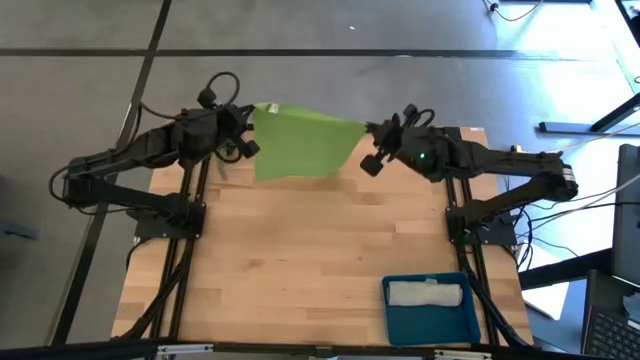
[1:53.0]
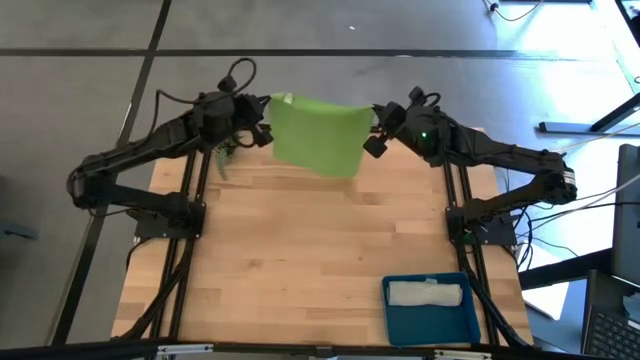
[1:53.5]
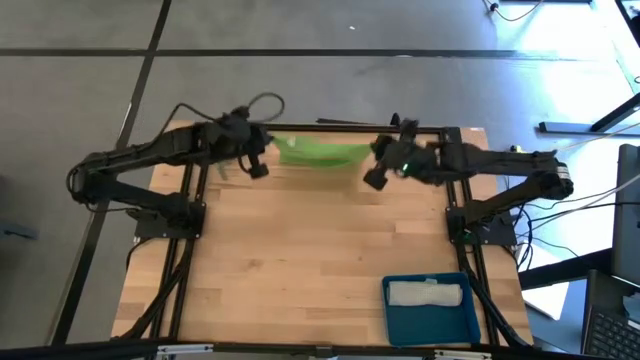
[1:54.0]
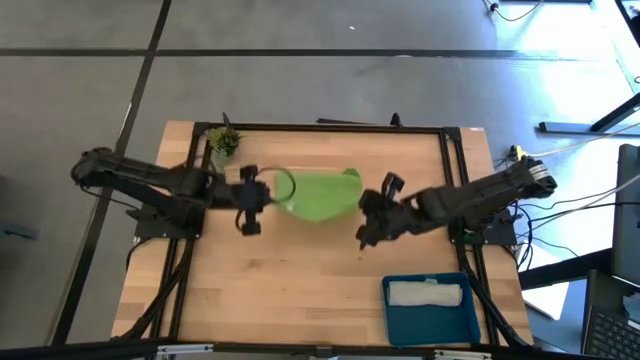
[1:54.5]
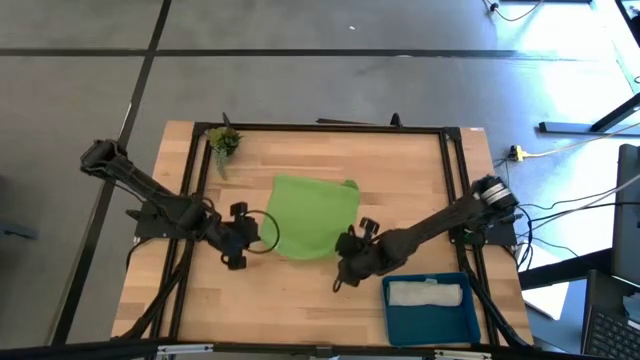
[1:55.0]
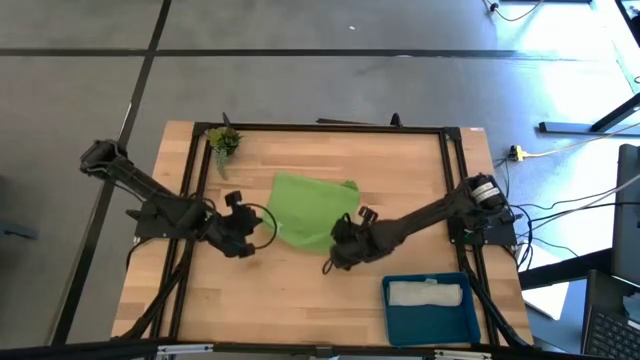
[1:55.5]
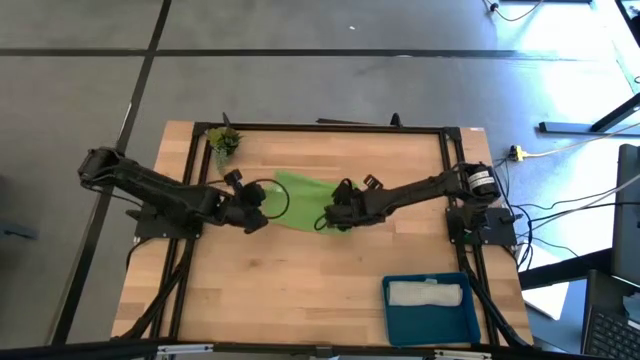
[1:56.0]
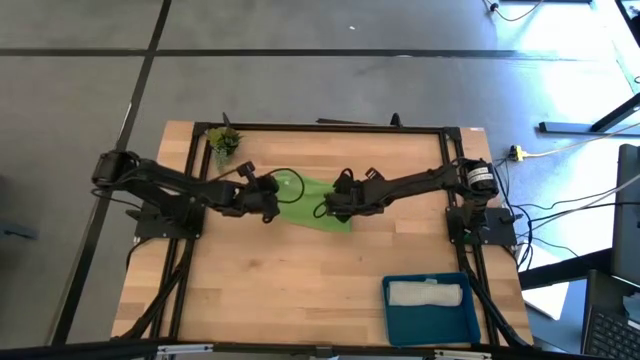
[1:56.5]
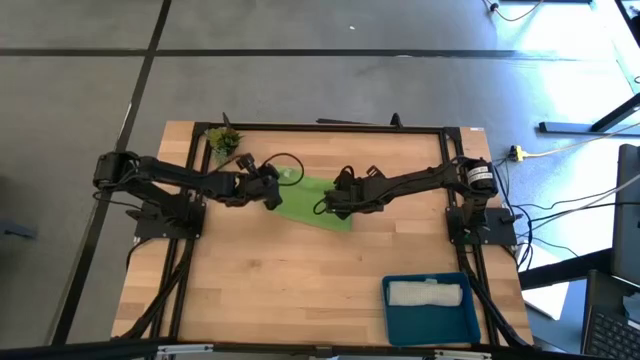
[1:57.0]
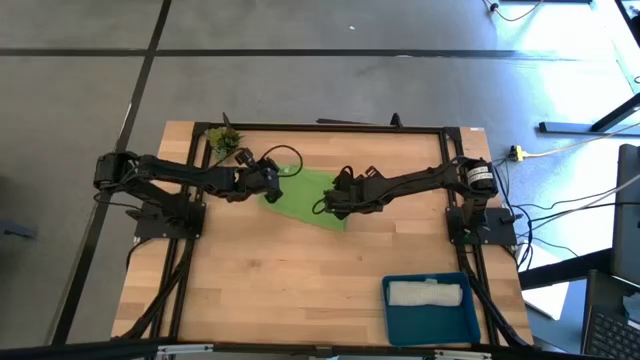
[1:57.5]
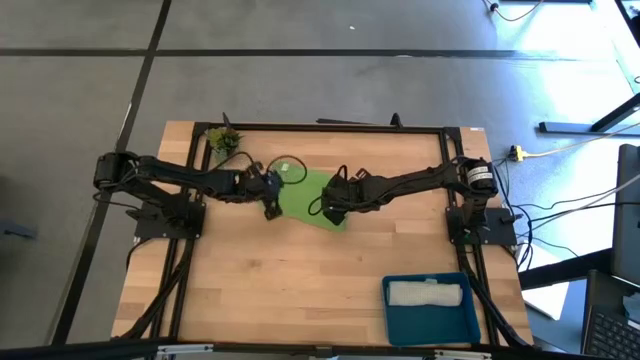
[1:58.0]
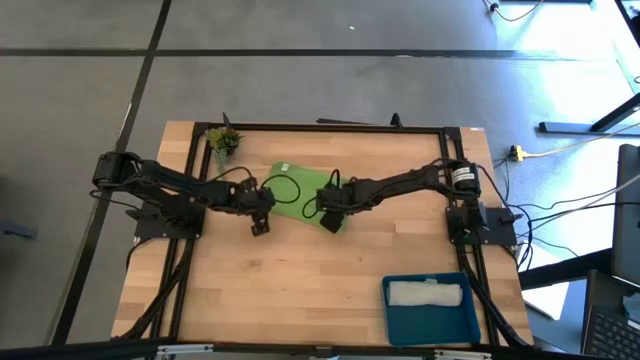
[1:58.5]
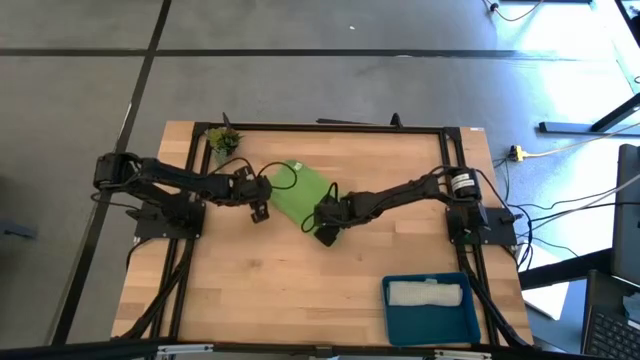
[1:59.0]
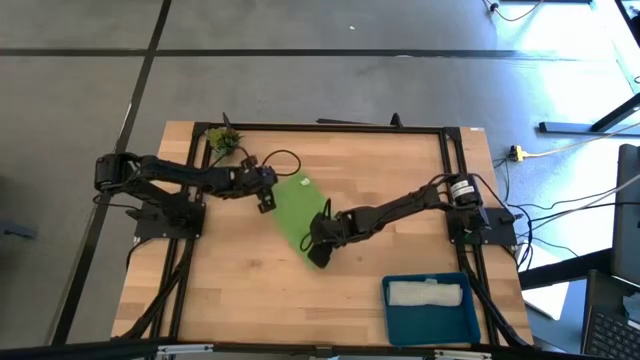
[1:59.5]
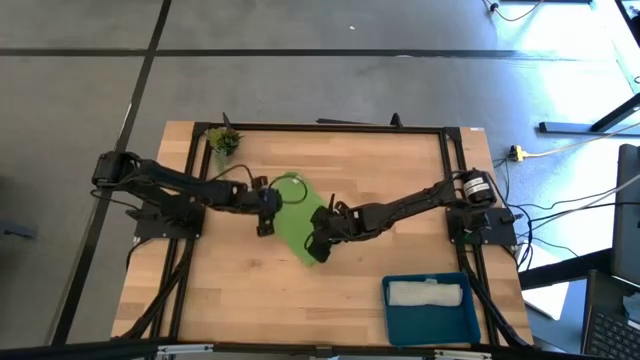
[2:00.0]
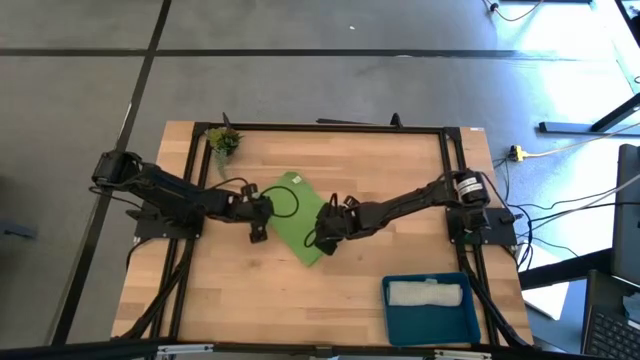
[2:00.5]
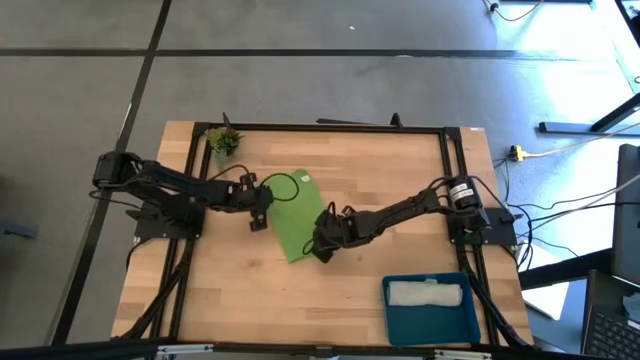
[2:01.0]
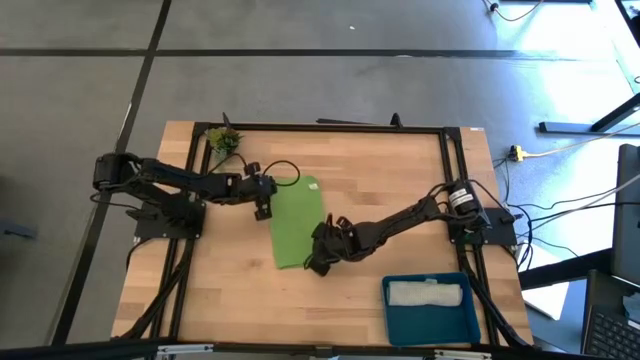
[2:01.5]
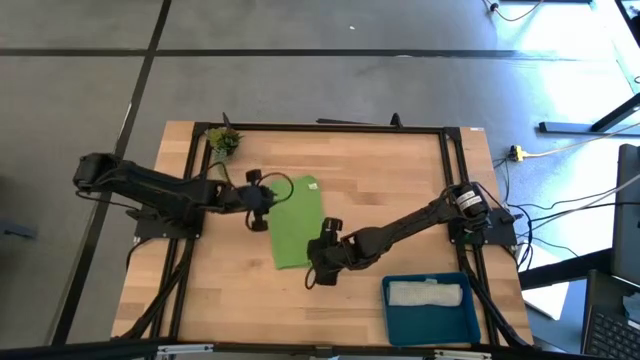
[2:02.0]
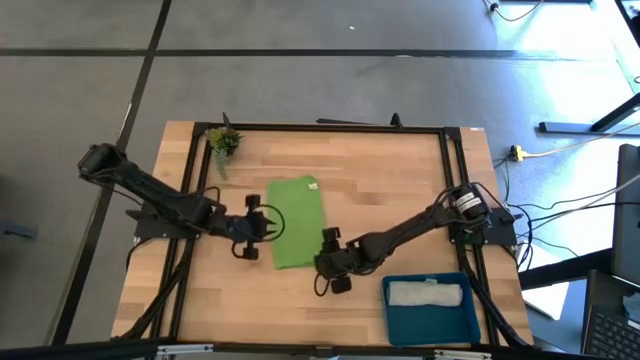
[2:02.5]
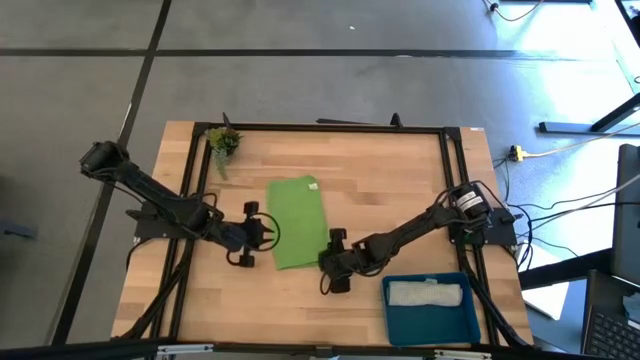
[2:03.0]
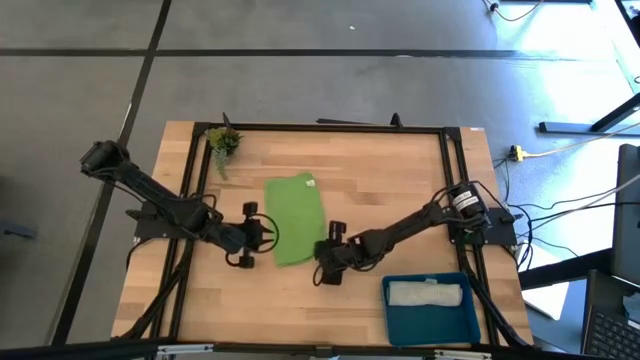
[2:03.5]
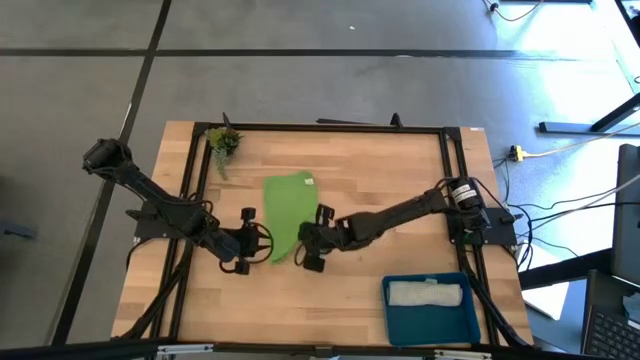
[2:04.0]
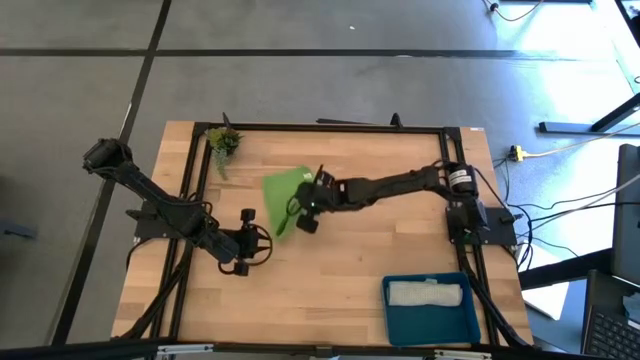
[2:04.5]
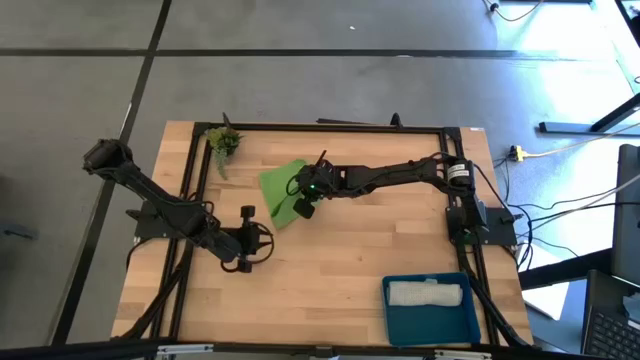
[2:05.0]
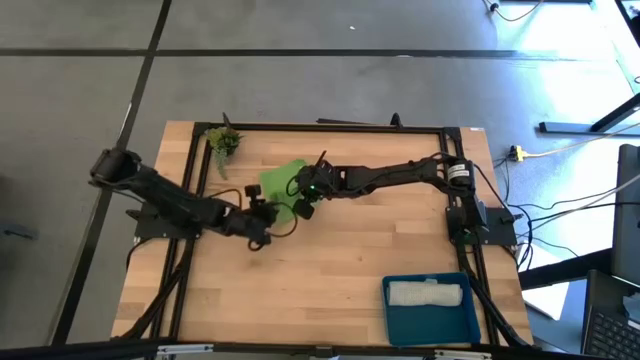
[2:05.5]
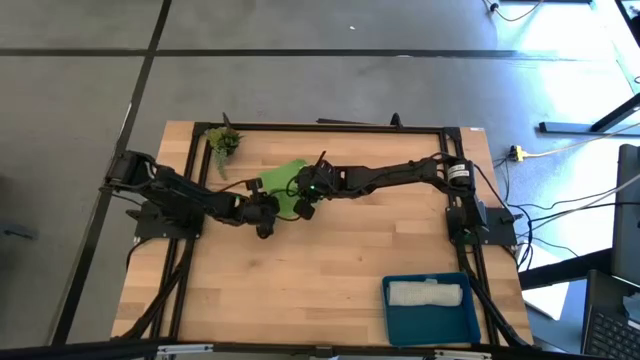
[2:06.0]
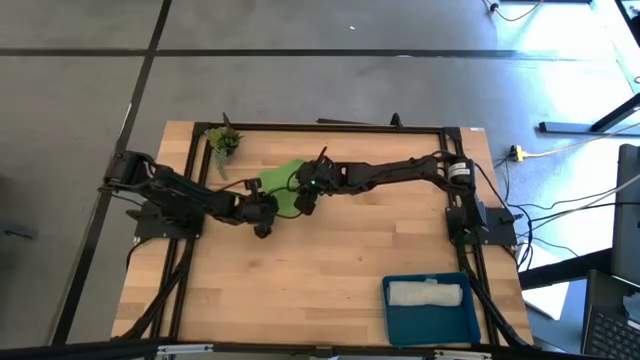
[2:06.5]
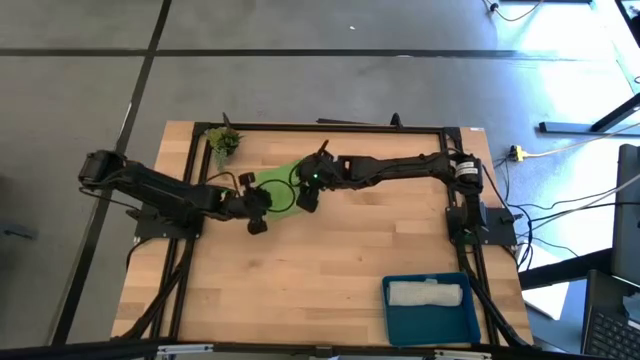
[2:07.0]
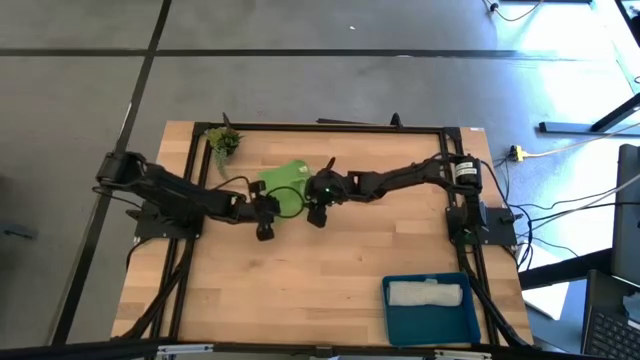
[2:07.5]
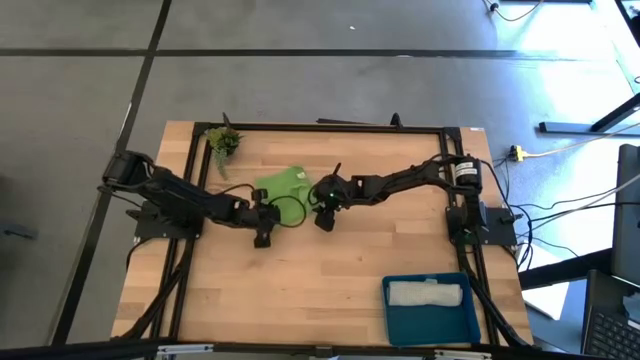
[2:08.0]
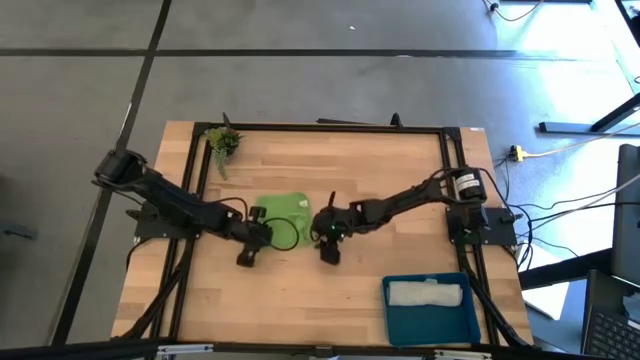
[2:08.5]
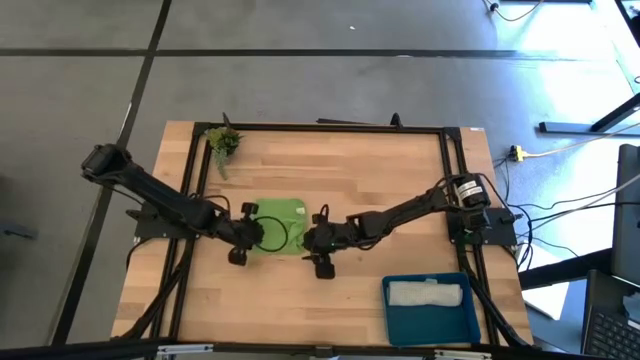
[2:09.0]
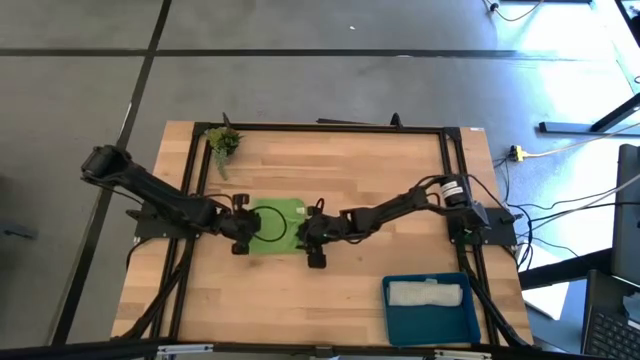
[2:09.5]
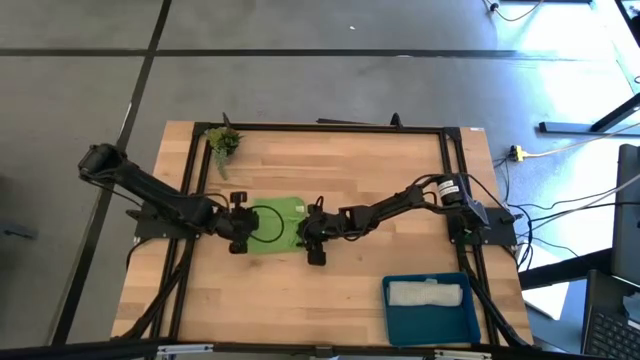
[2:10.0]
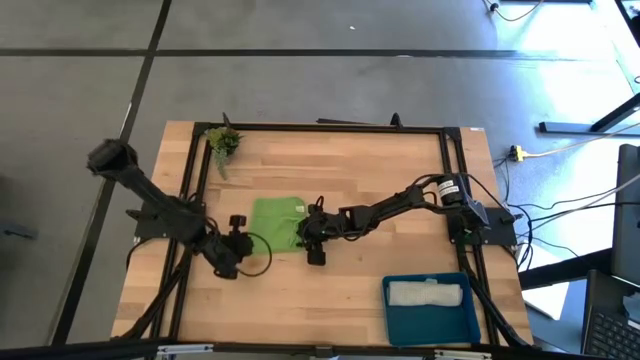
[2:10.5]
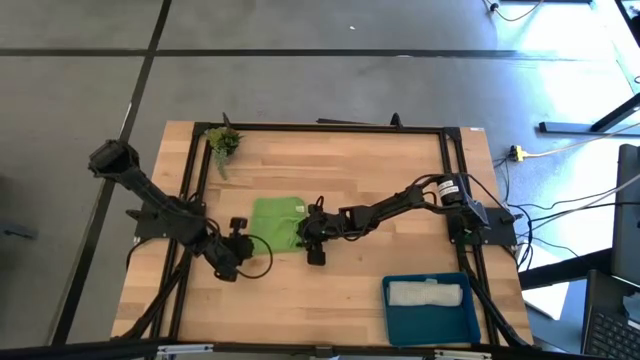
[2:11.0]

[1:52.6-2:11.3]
Task: Roll microfiber towels into tight, uniform cylinder then place into a basket
Fold the green towel

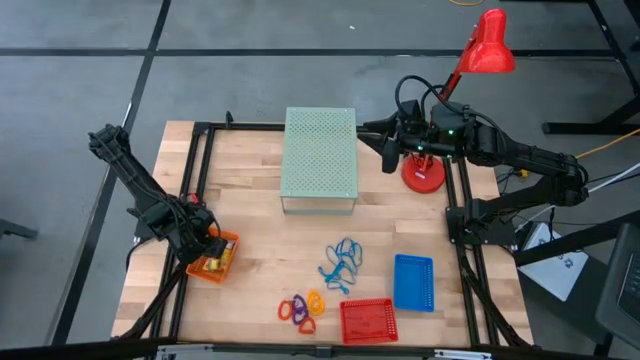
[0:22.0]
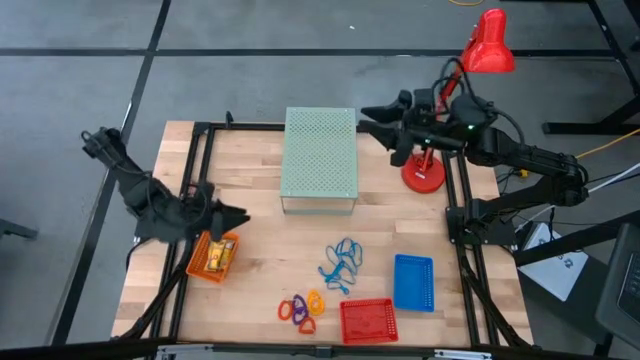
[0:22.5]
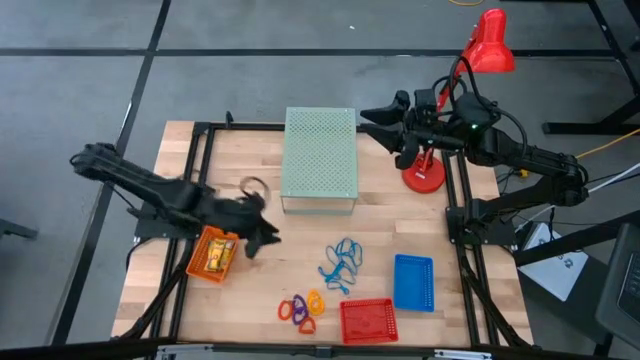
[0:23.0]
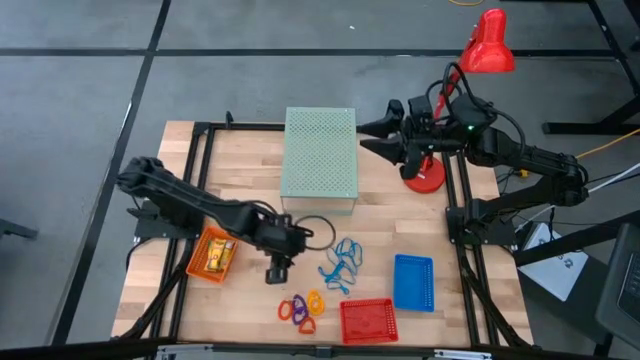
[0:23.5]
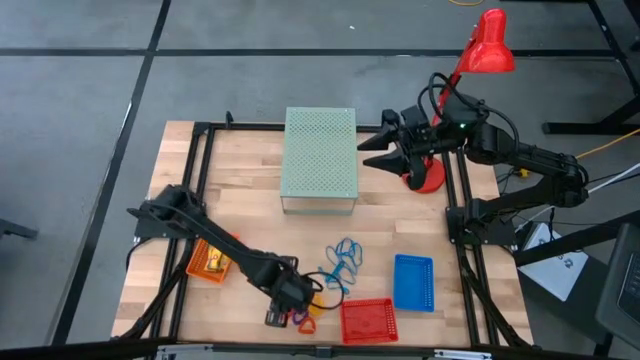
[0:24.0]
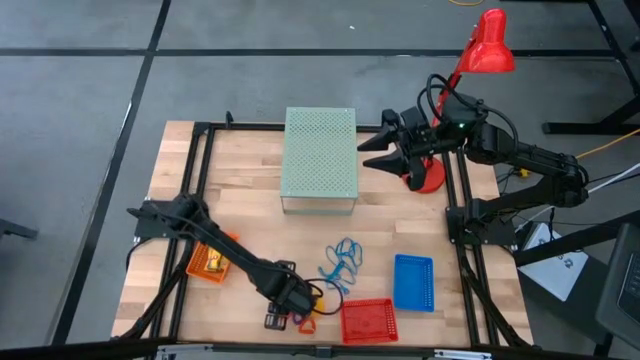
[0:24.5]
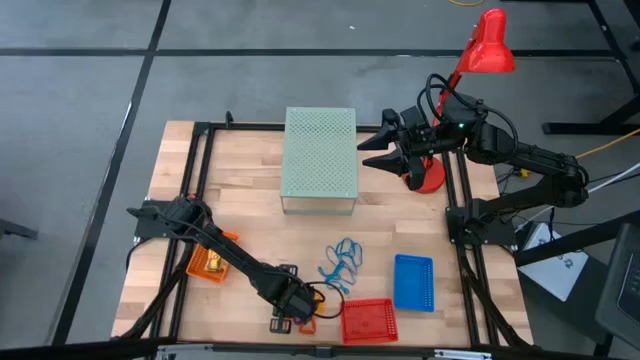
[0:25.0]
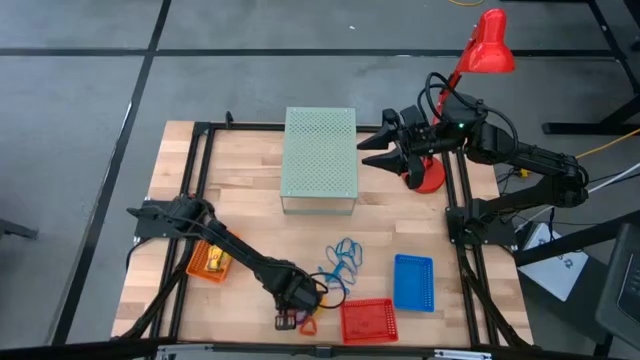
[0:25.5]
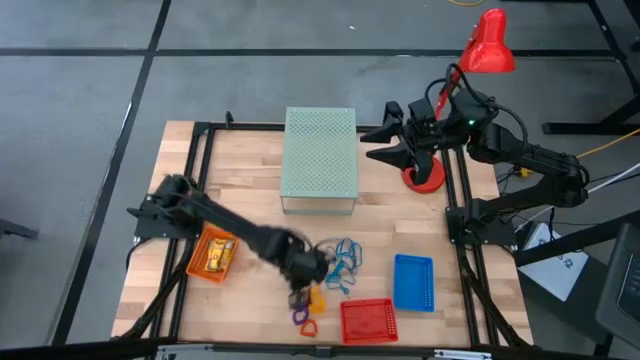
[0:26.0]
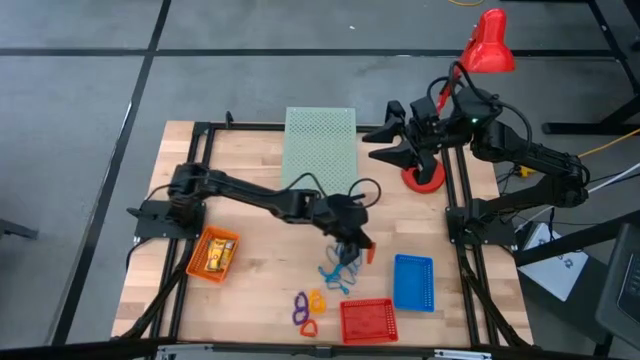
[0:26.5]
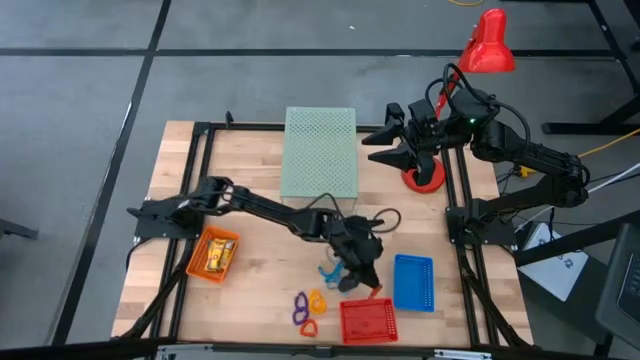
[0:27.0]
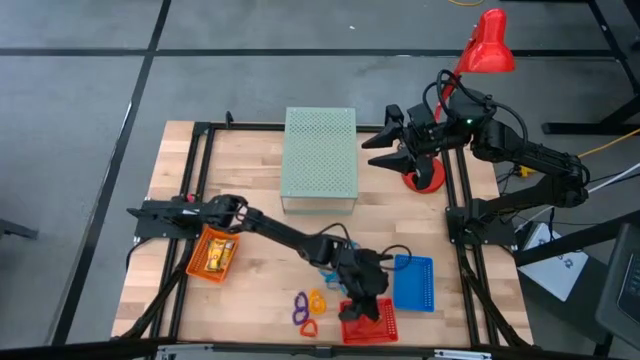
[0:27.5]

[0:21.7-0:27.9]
Task: Pick & Place Office Desk Supplies
Put the red coil keychain into the red bin
